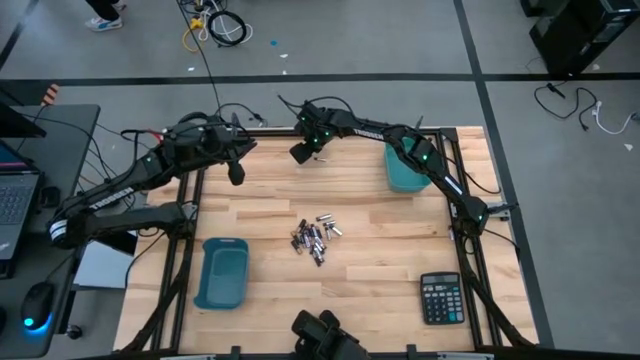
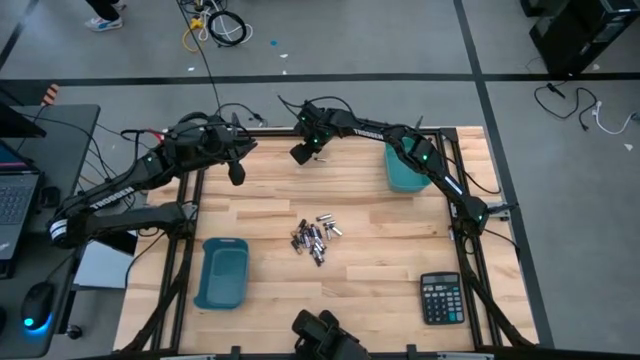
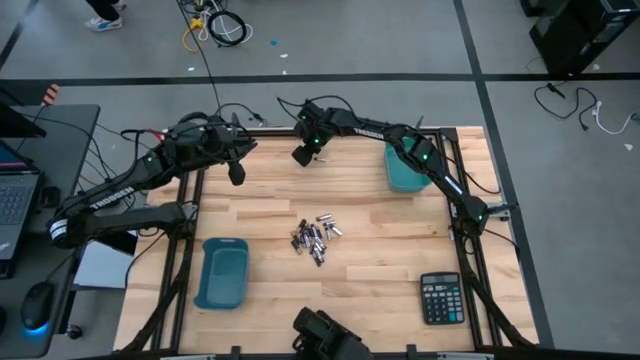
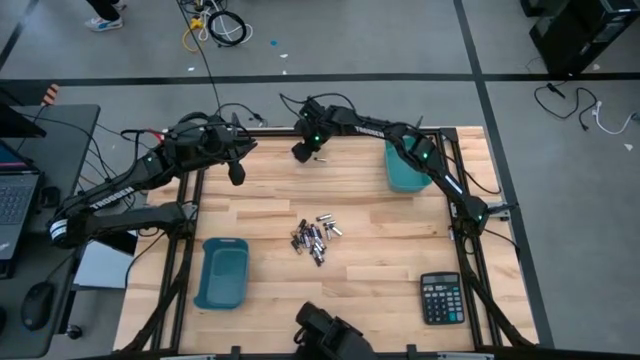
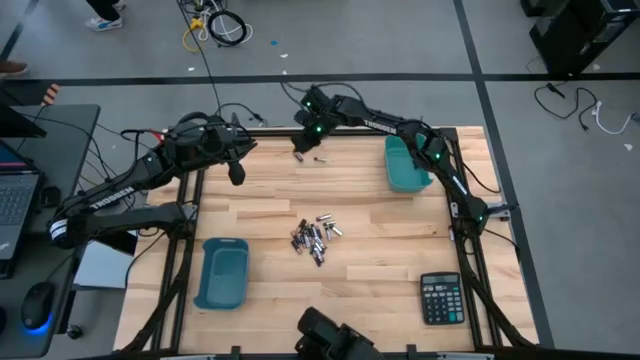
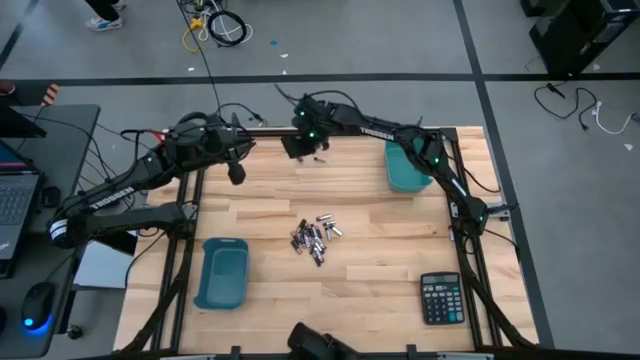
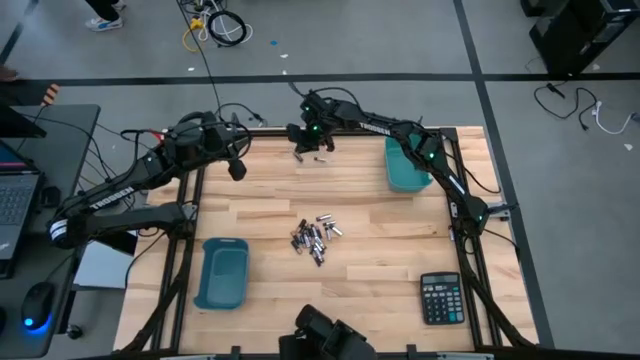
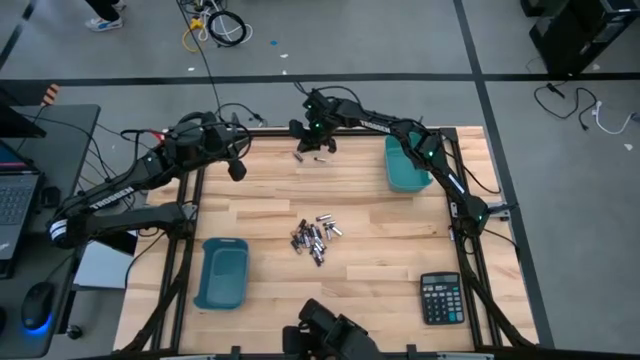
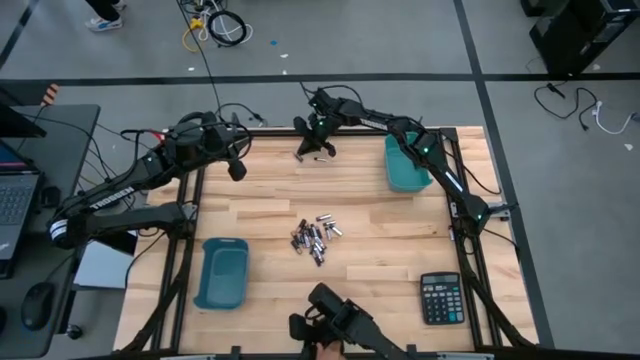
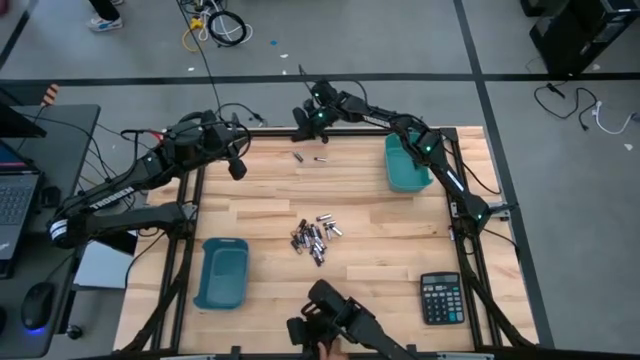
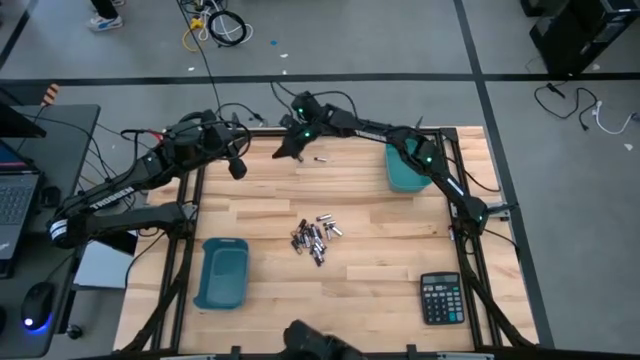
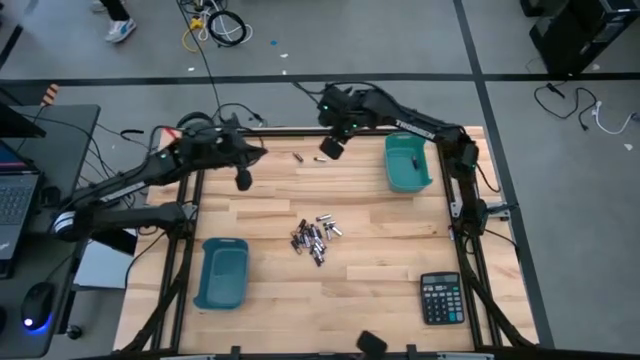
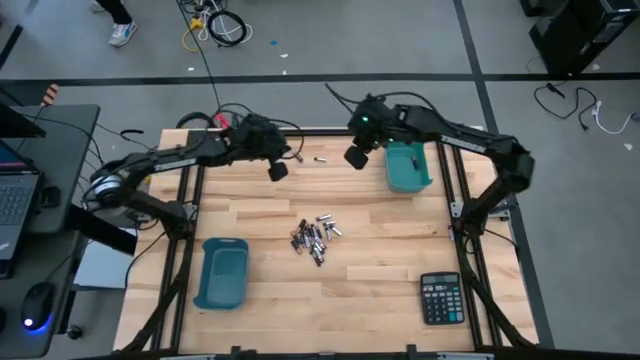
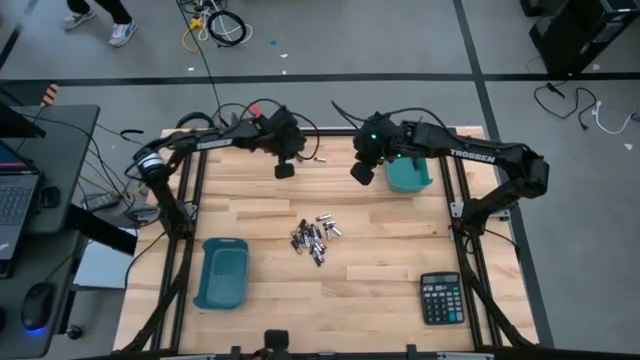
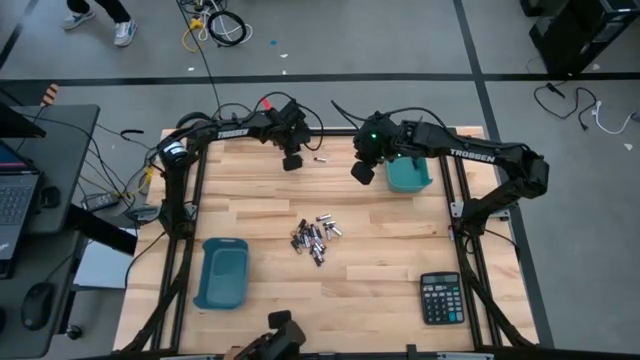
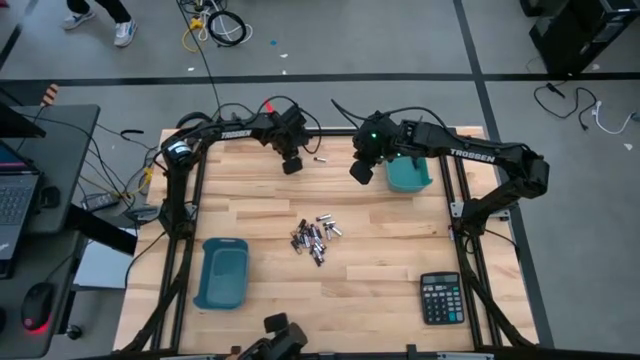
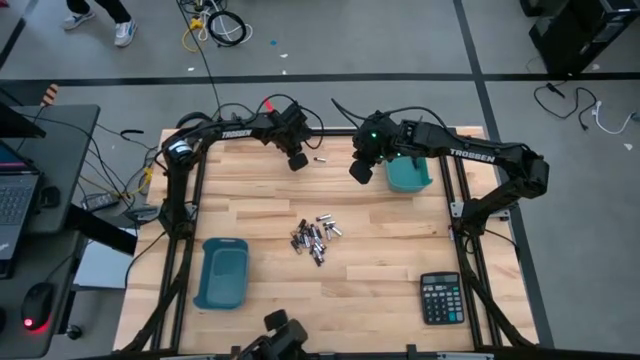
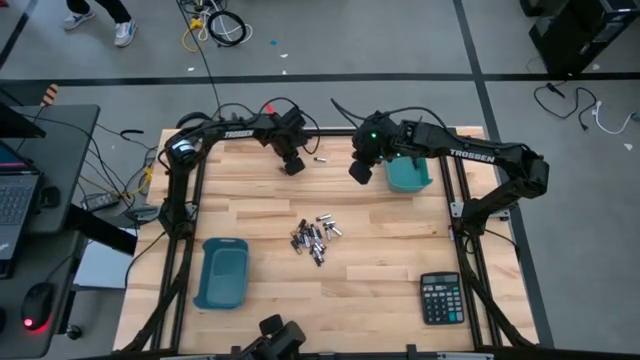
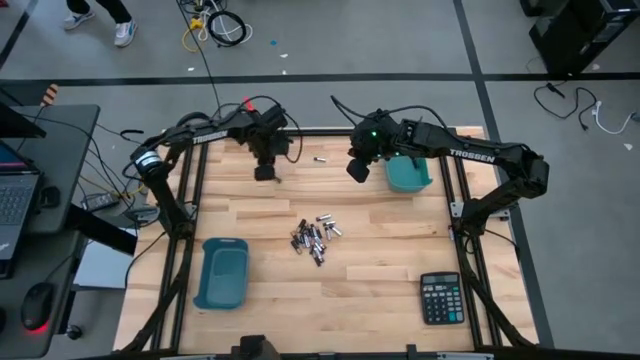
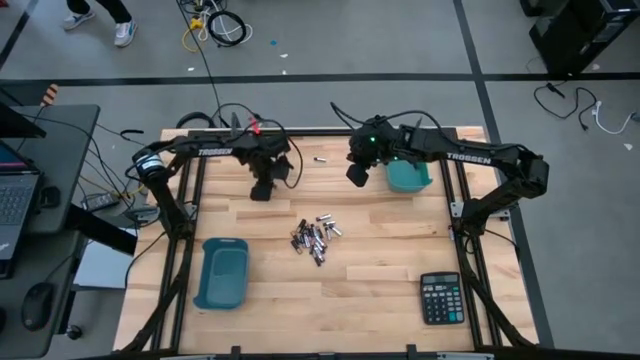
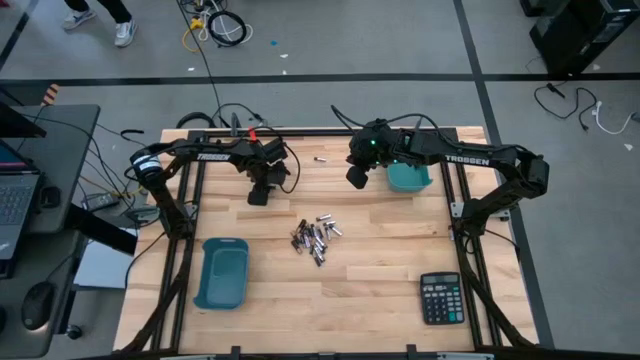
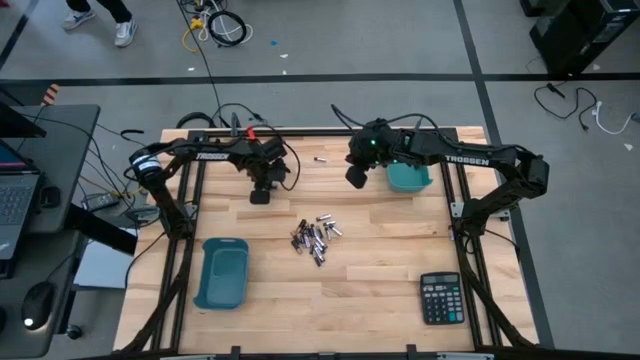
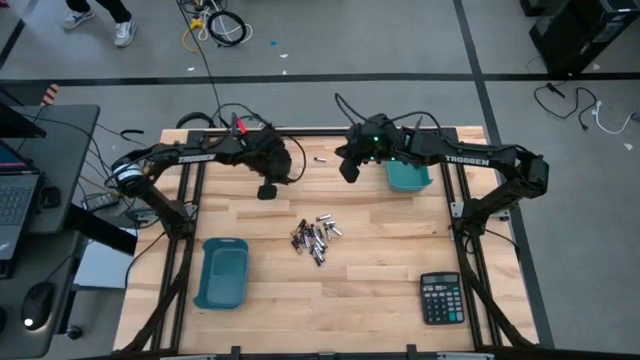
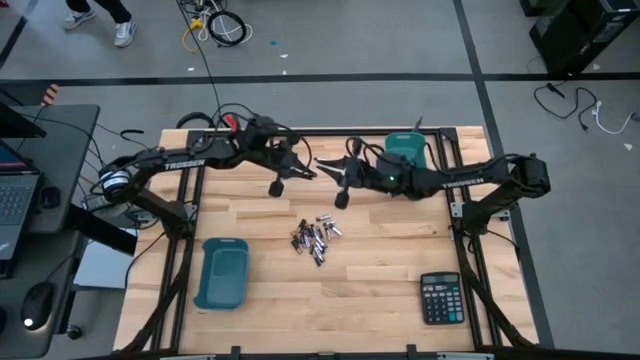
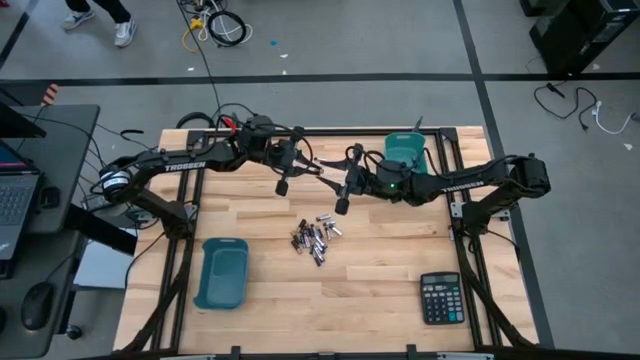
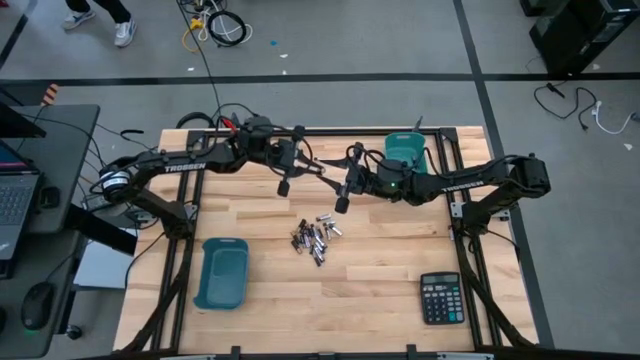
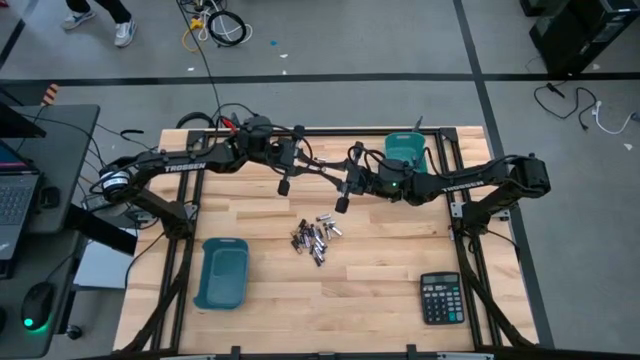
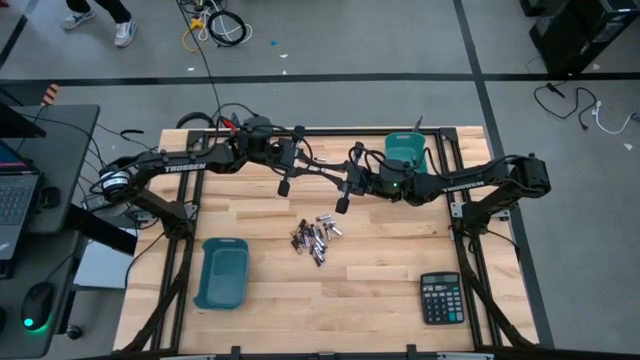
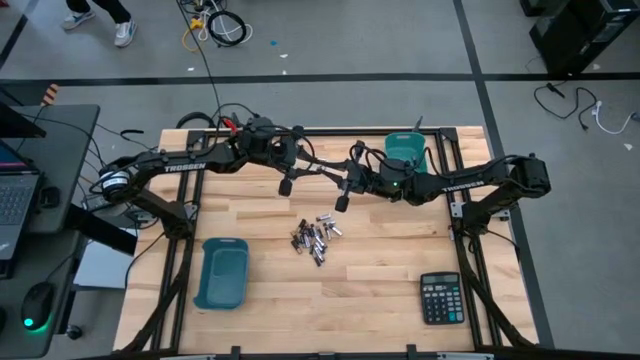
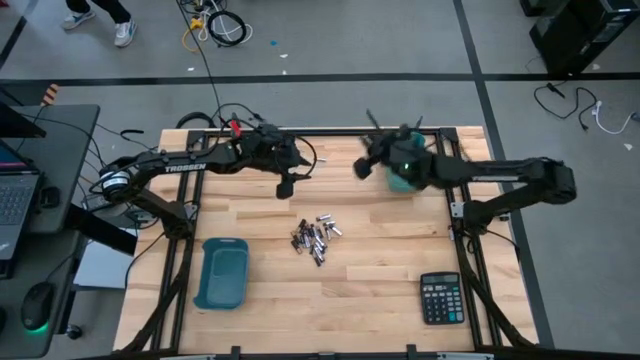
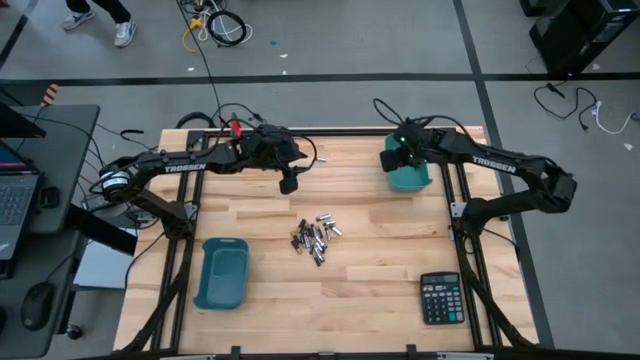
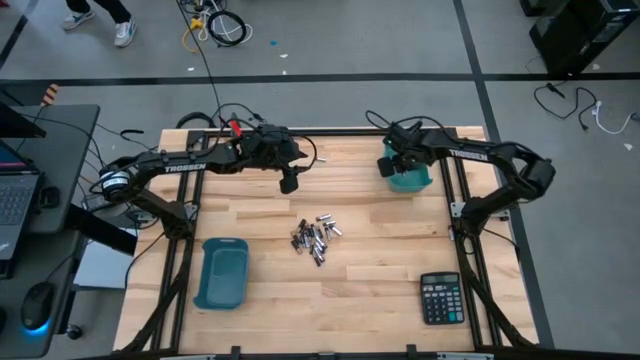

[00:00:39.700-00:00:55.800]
Task: Sort batteries
Put the black battery into the green bin

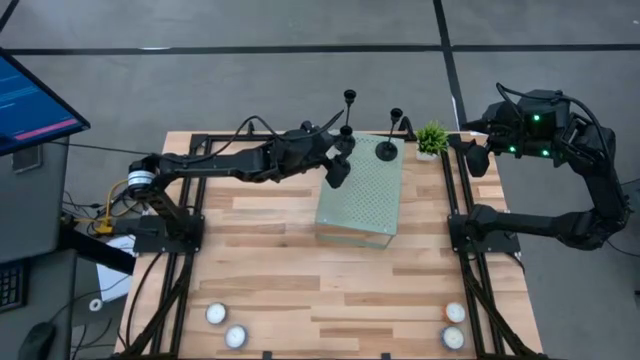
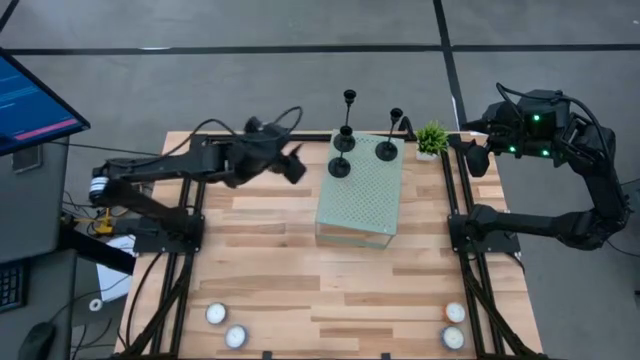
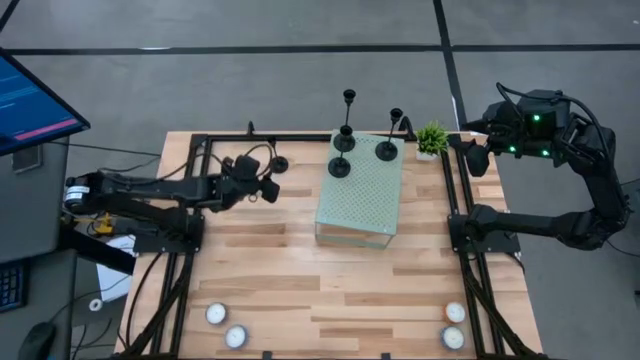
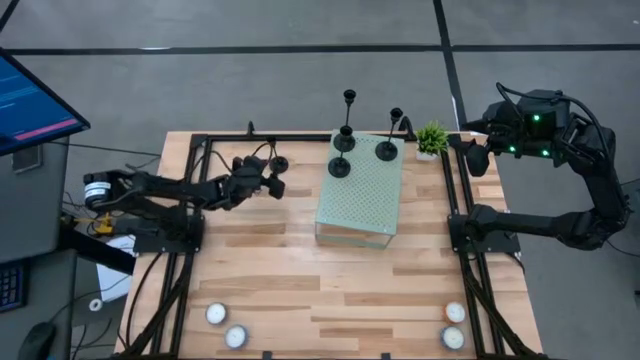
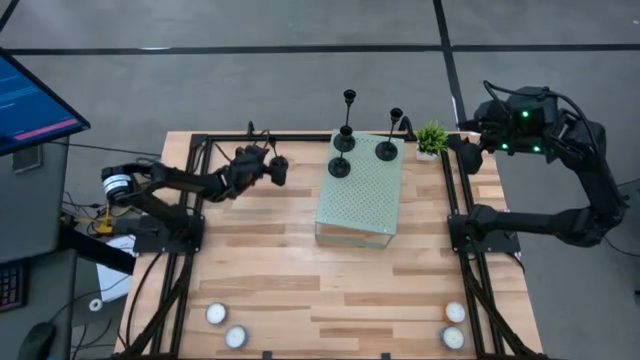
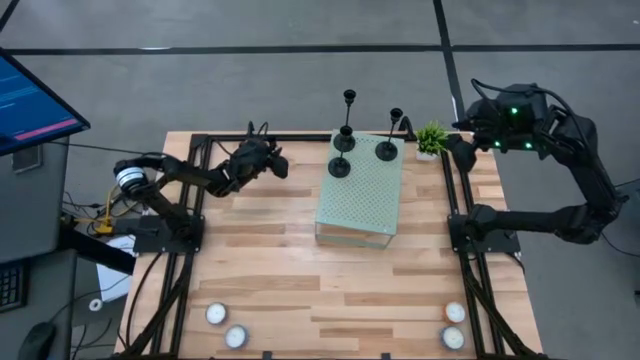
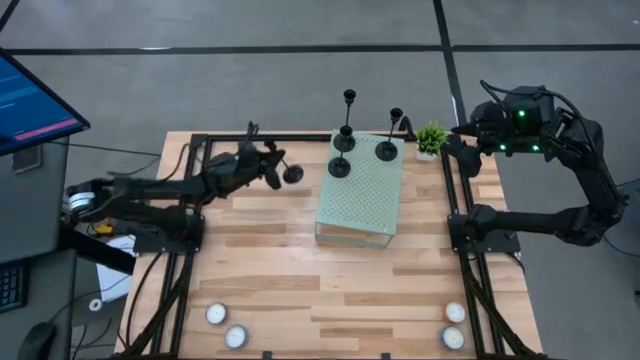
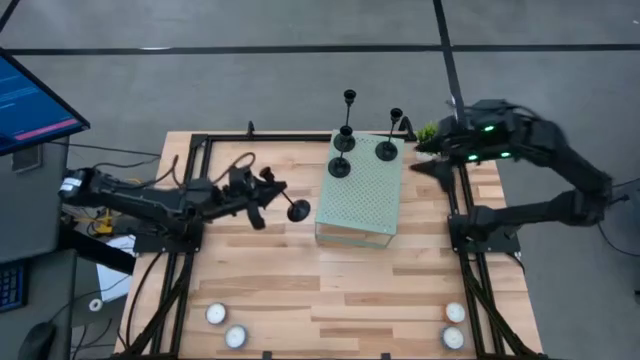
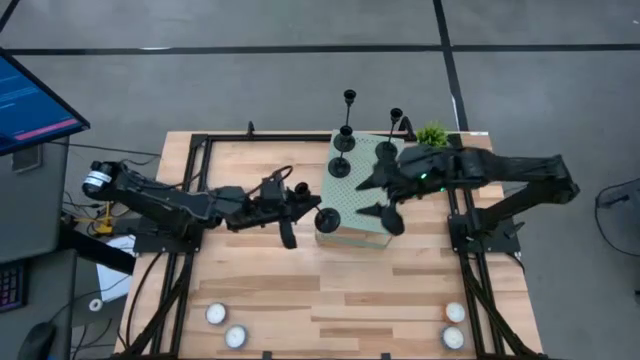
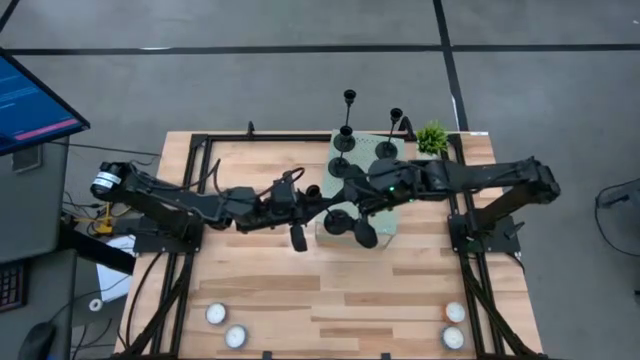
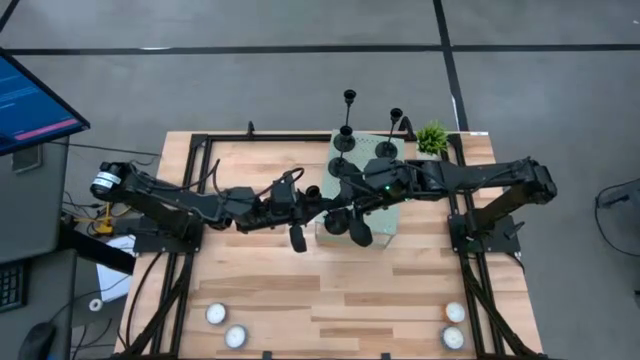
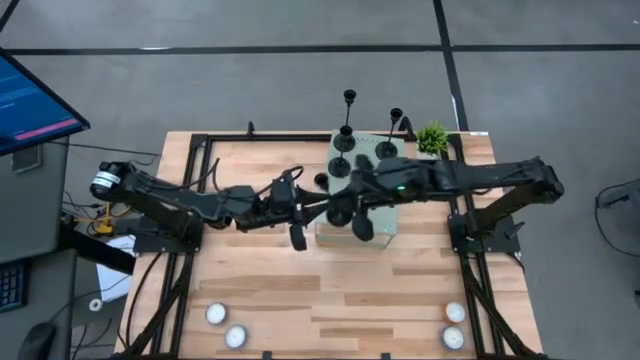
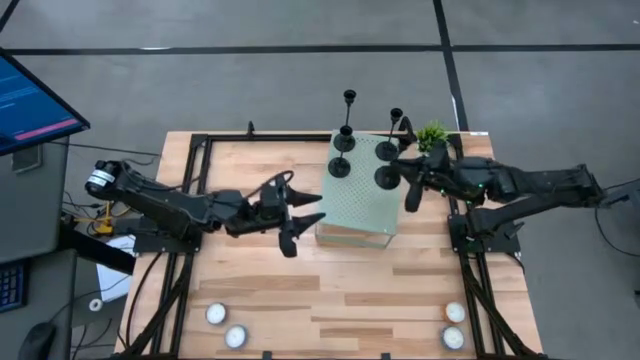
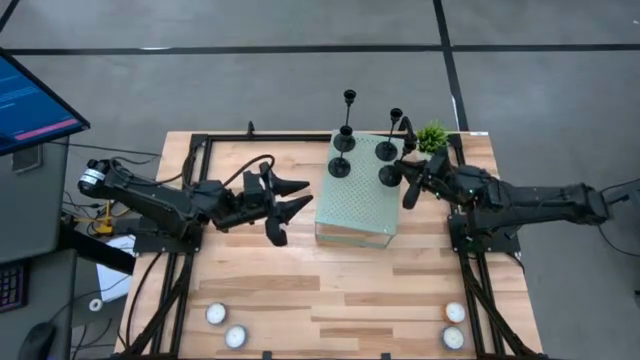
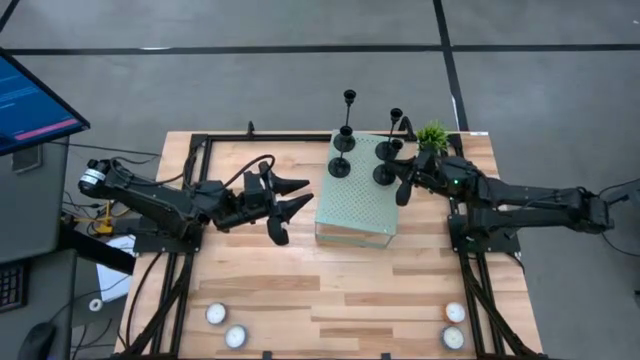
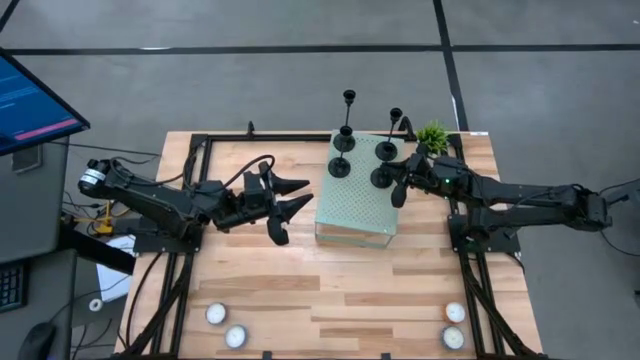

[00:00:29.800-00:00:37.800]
Task: Pick & Place candle stick holders
Put the black candle holder on the shelf and align it with the bottom black candle holder
